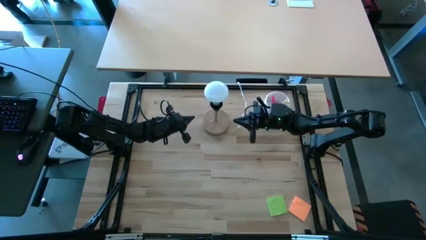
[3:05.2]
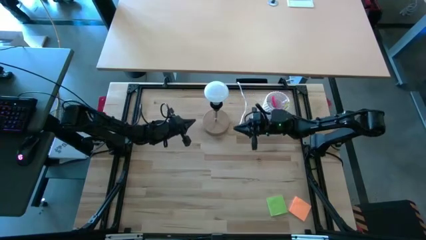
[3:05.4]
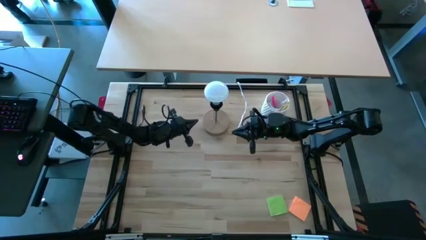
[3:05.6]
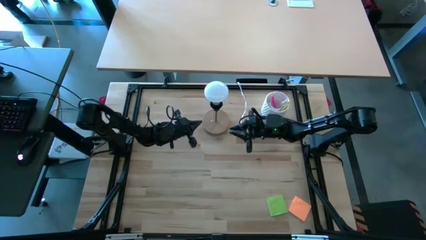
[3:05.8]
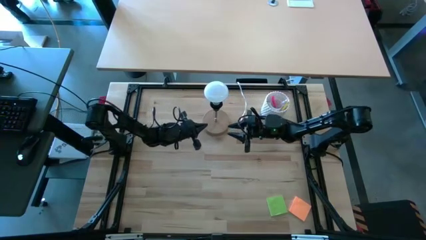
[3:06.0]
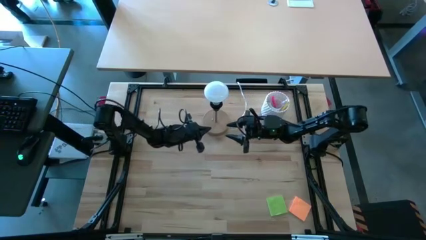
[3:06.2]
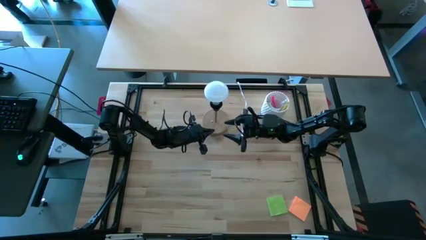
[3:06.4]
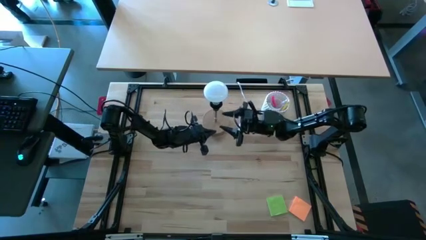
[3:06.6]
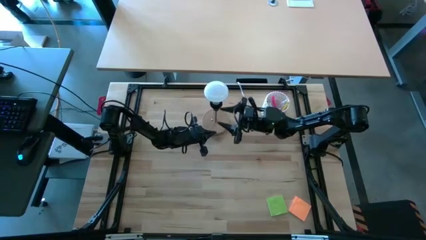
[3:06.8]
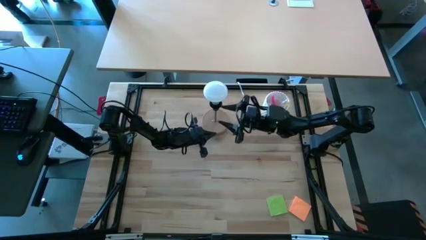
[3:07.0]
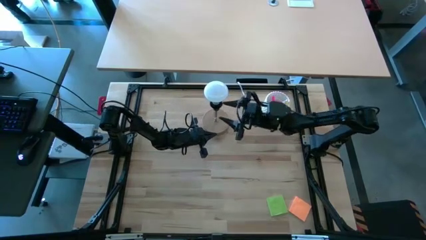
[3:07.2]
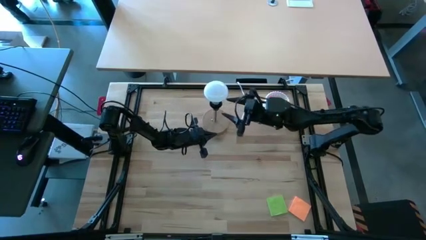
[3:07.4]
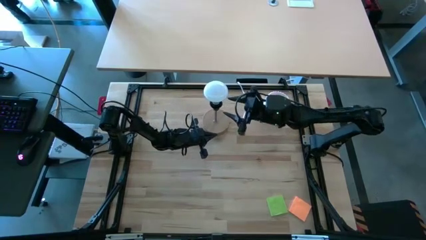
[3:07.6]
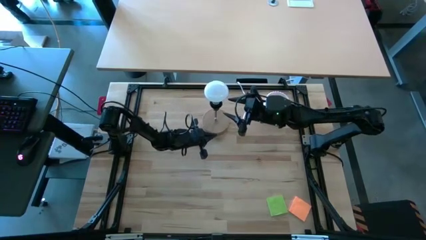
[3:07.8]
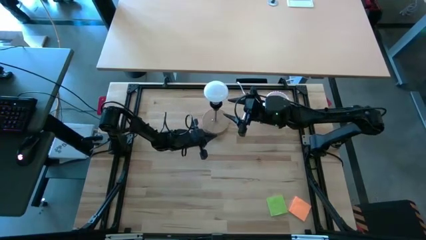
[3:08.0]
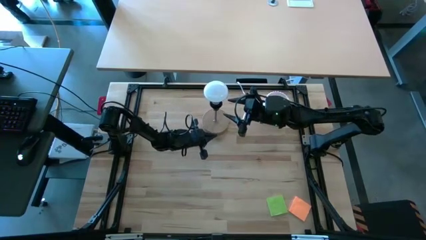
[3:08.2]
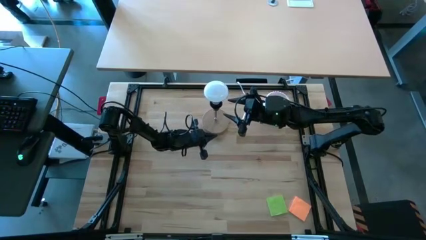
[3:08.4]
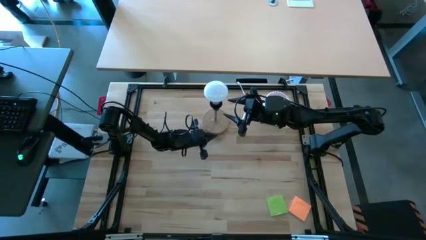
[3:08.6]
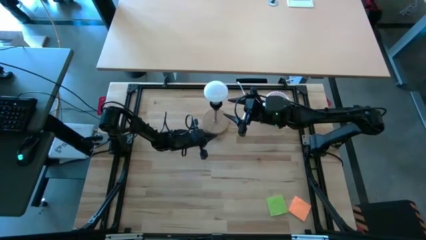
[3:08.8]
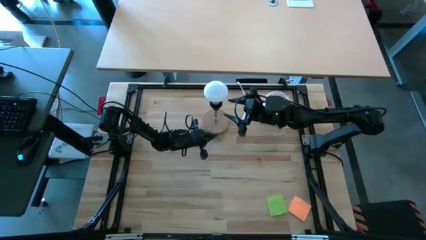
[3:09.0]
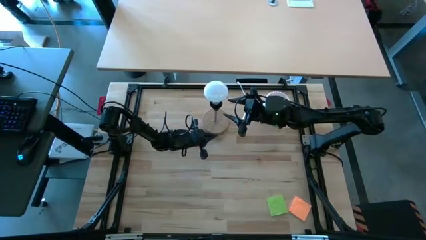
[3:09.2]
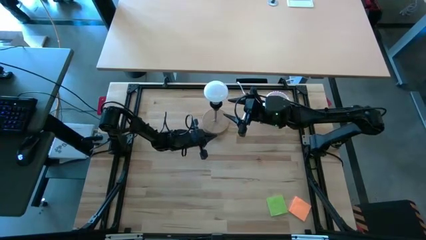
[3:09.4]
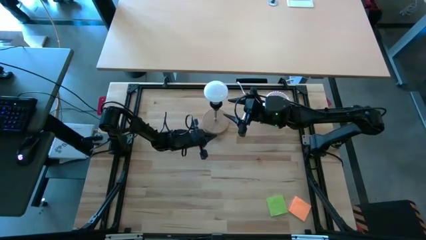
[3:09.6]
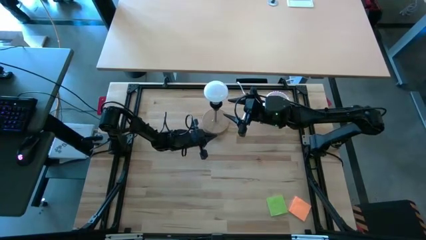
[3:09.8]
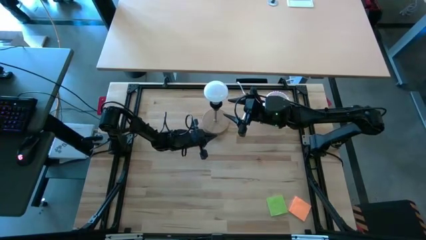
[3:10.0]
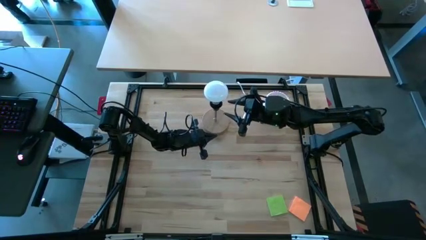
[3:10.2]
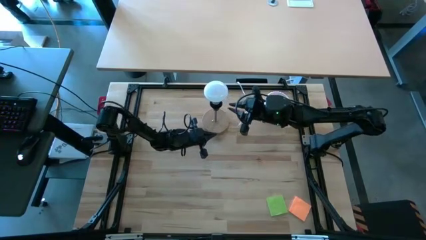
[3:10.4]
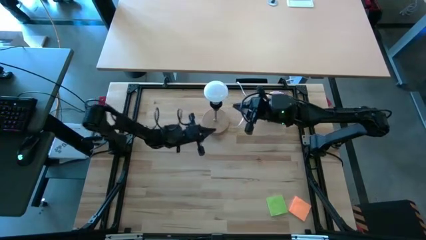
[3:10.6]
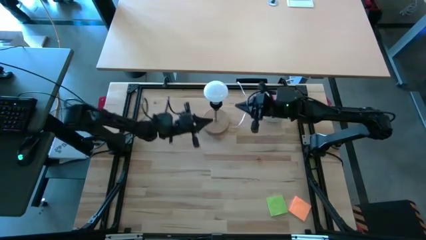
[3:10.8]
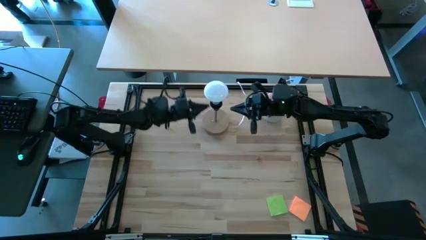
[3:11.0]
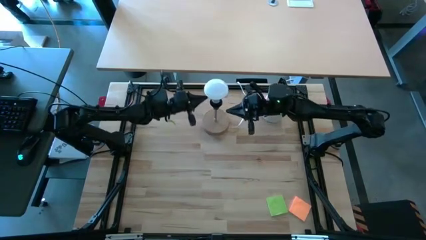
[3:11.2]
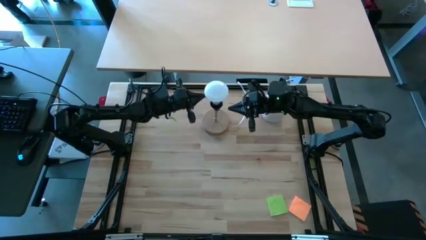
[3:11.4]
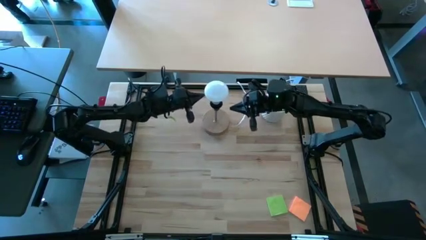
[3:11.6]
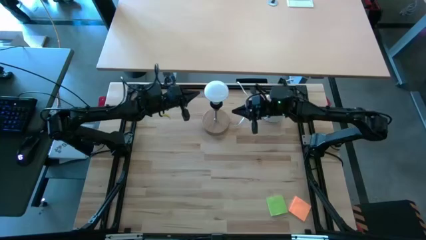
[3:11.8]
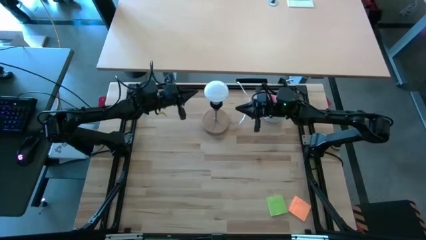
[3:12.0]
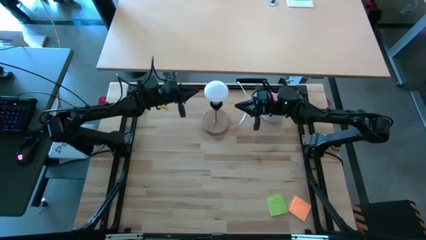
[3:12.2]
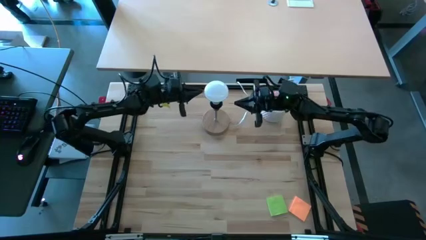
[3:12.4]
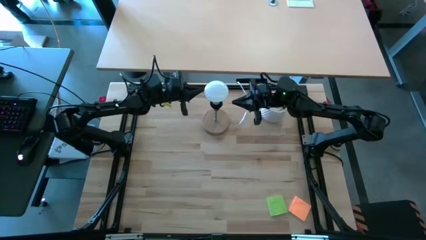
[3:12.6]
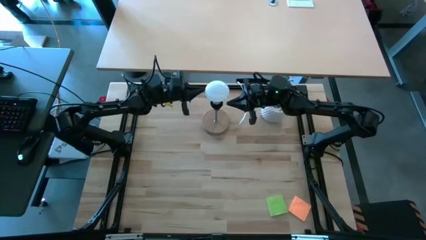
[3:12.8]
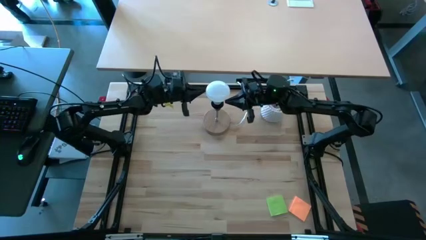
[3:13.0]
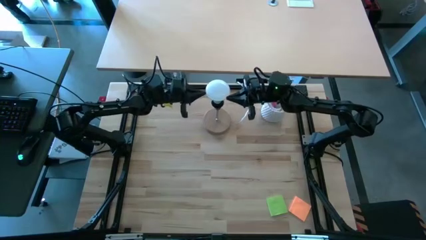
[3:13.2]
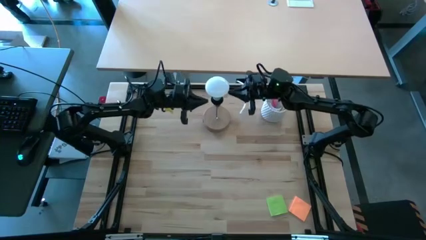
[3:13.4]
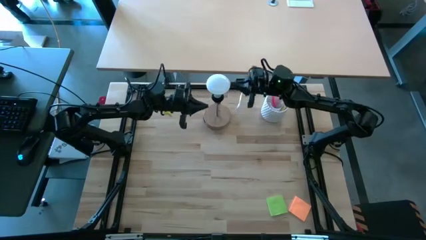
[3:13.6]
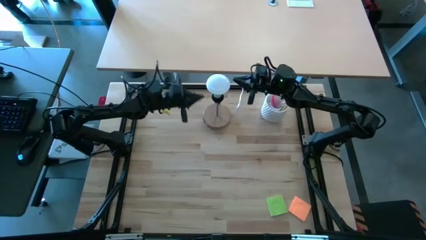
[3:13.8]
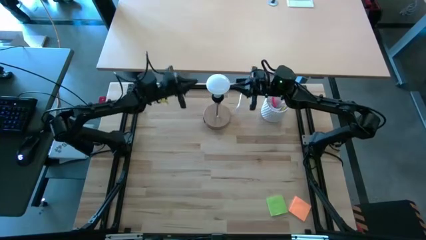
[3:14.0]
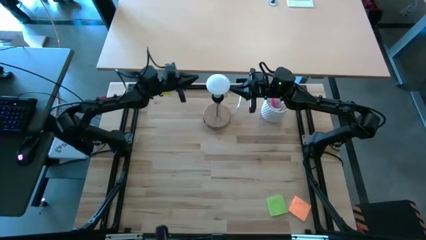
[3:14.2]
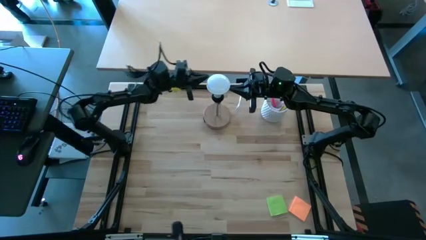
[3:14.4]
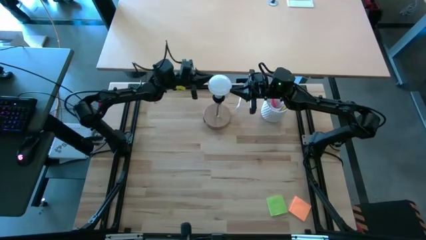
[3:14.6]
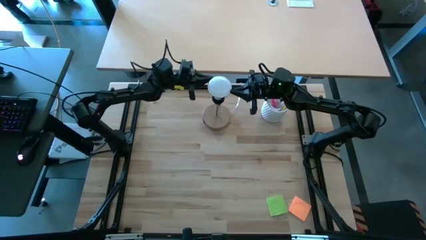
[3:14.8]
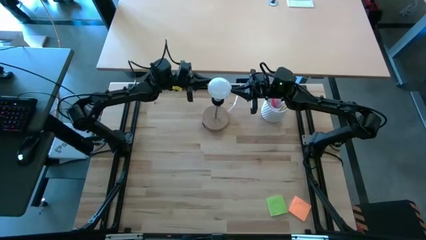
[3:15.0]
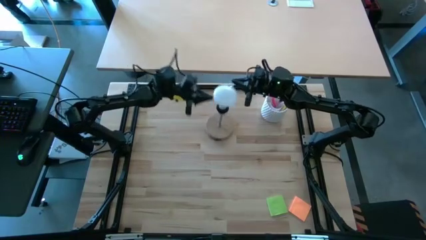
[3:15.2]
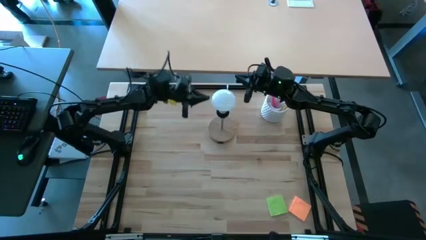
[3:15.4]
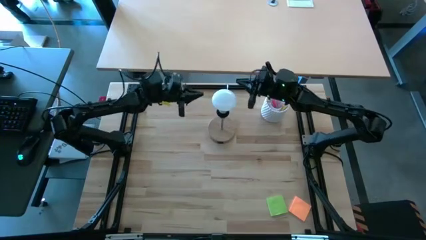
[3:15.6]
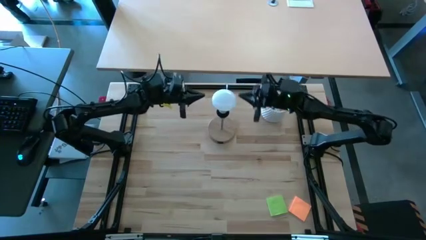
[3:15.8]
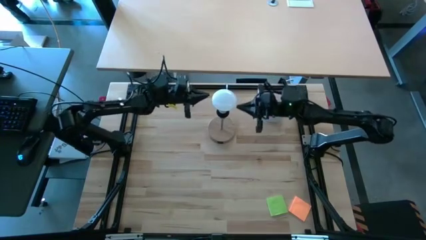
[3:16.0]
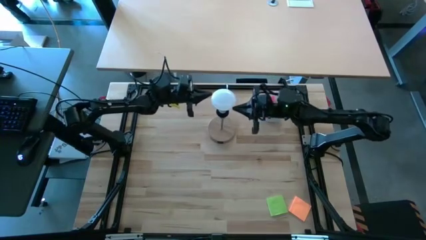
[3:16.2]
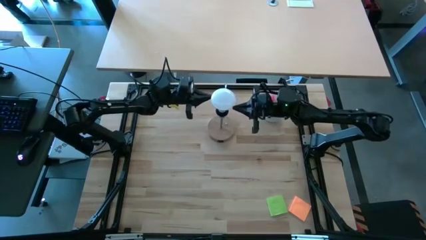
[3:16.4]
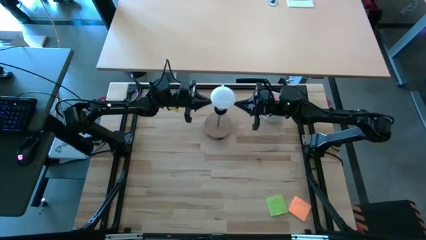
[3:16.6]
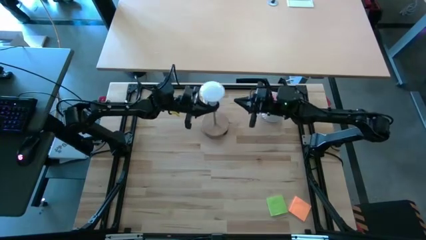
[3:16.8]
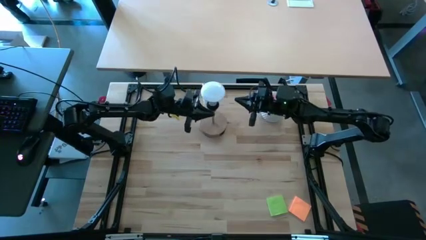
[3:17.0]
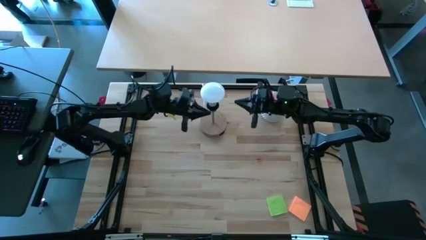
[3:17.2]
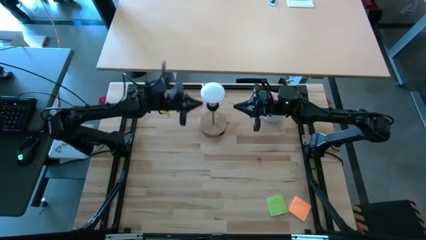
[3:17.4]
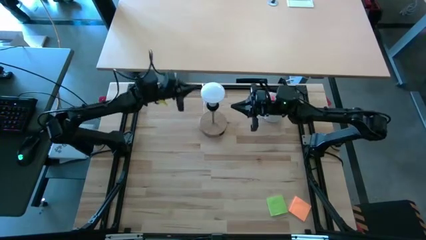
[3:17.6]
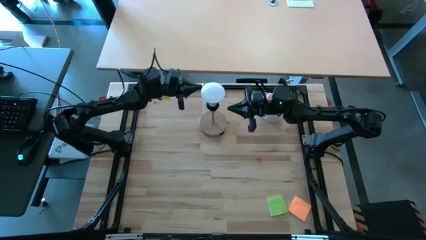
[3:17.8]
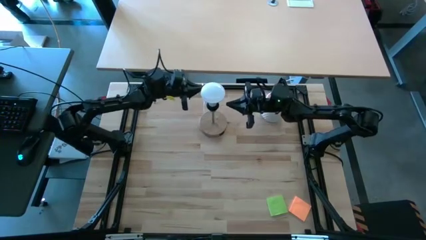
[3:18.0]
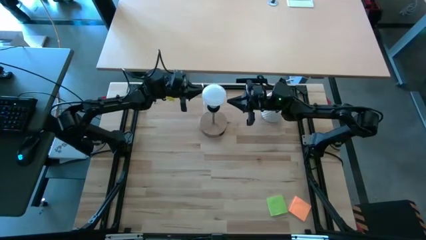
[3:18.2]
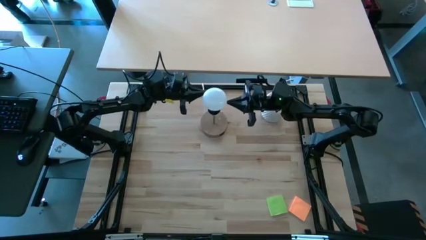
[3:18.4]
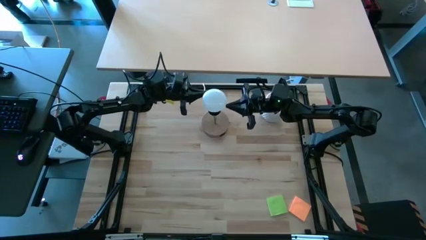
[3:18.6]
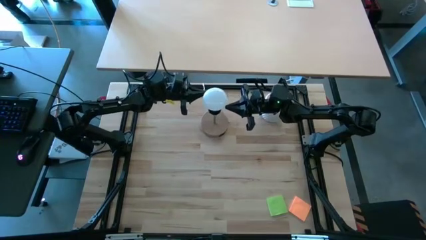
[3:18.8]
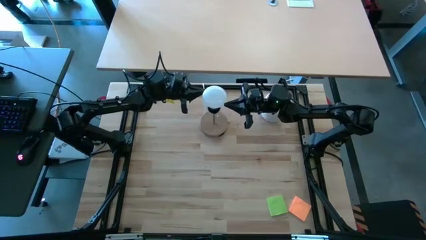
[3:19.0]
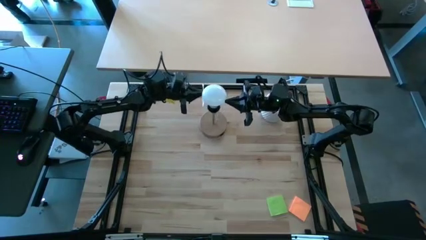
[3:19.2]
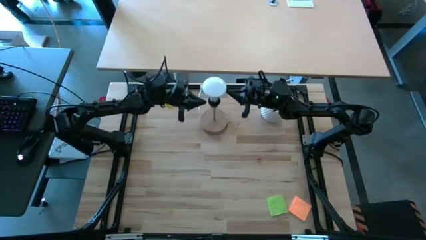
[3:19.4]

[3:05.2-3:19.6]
Task: Screw lightbulb
Remove the lightbulb from the lamp

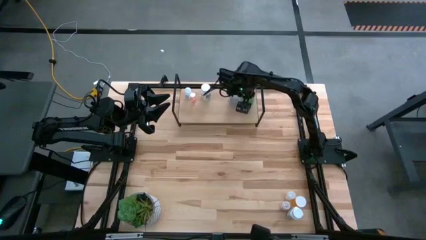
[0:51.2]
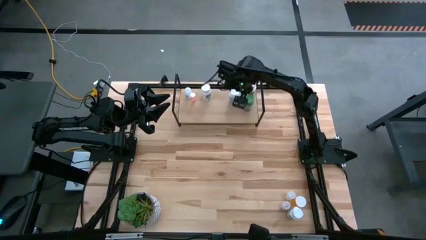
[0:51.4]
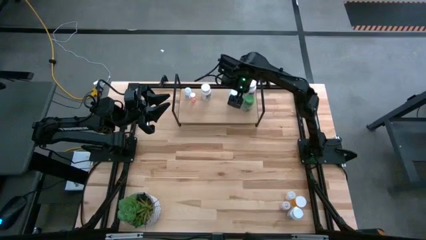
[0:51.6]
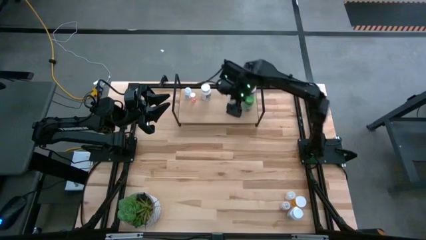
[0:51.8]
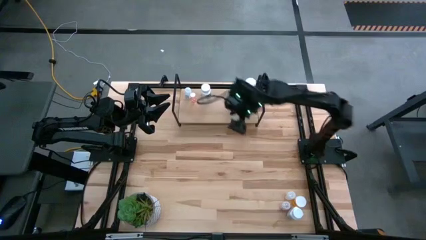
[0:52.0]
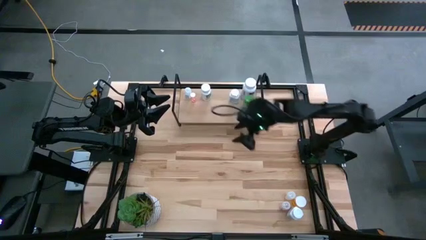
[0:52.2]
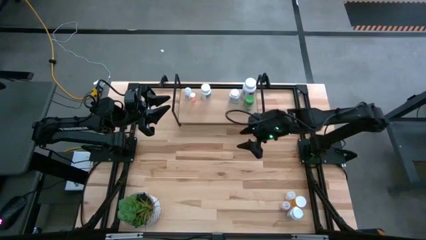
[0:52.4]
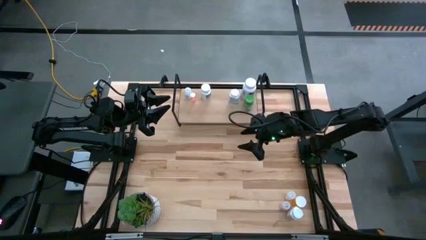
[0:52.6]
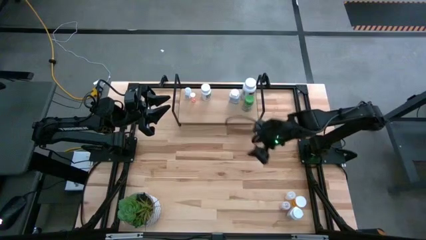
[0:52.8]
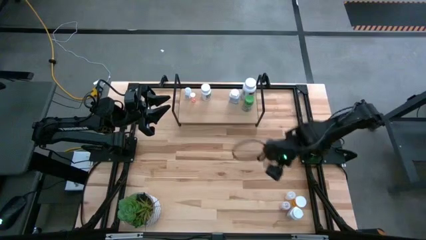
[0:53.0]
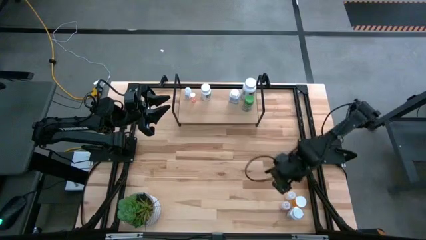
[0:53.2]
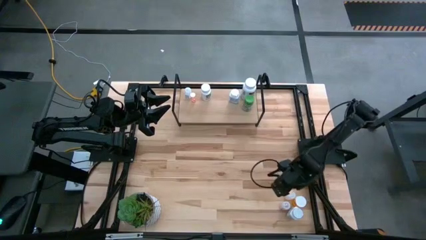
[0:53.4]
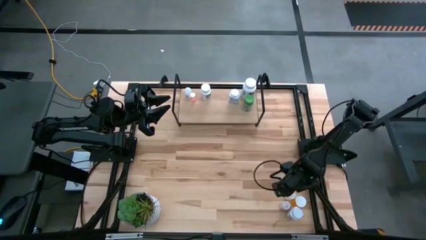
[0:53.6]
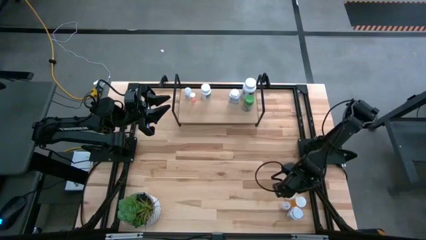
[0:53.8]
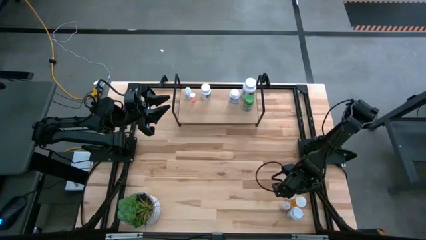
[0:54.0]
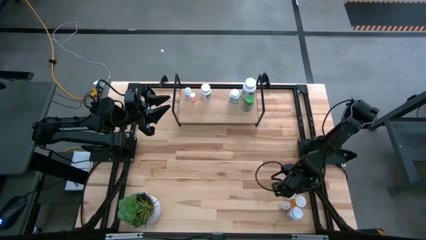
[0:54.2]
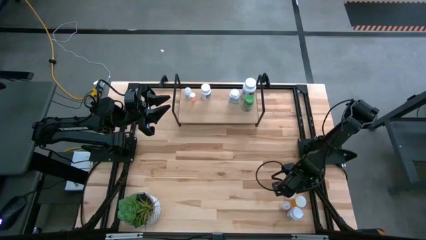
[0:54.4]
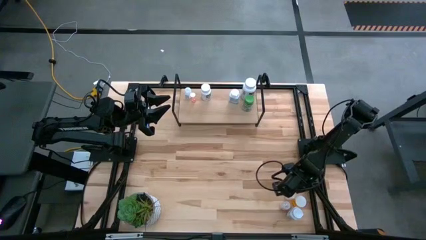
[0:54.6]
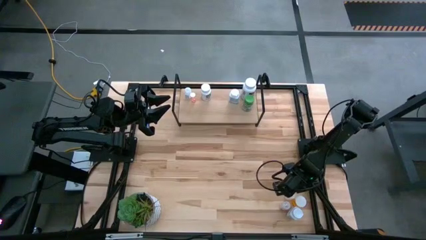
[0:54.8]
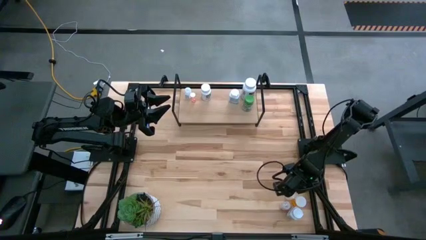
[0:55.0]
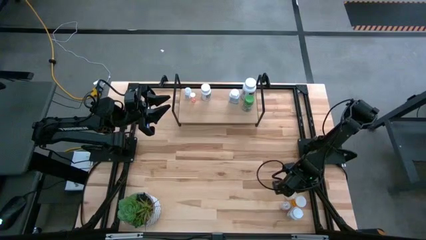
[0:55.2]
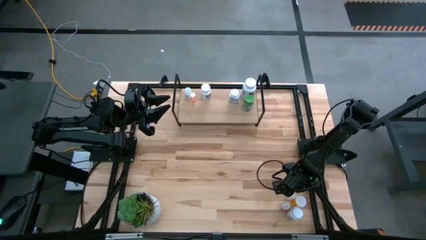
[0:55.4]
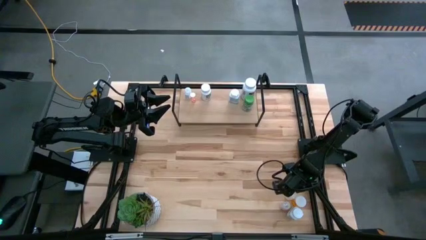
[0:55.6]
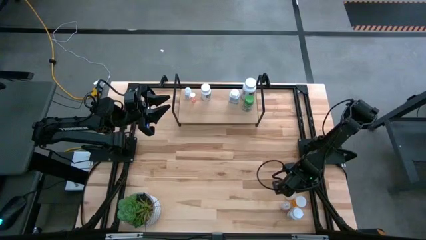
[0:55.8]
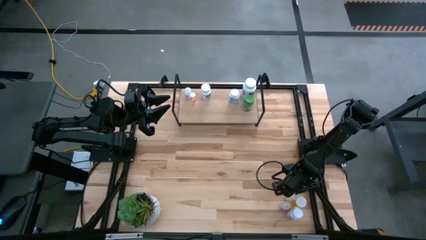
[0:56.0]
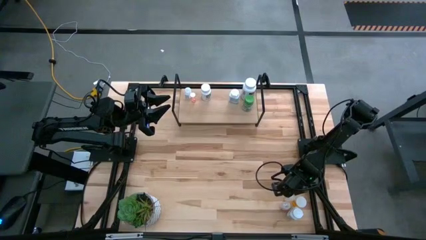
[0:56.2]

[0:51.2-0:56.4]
Task: Pick and place medicine bottles onto shelf by color
Put the transparent pill bottle on the shelf
